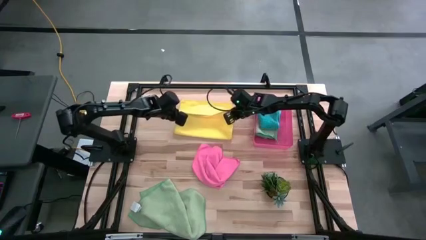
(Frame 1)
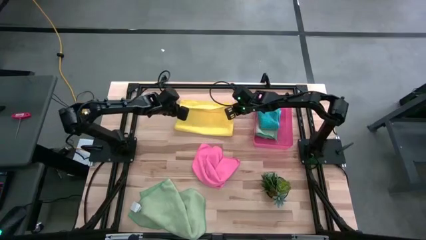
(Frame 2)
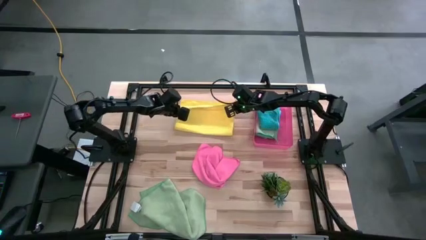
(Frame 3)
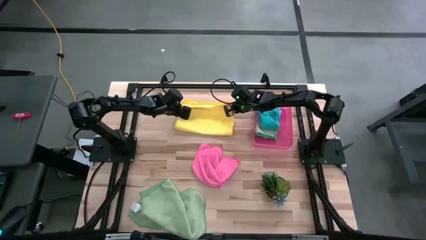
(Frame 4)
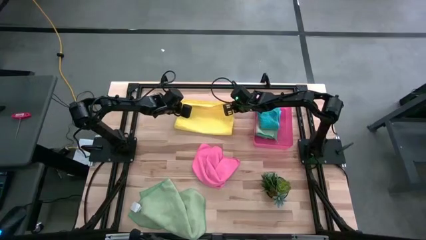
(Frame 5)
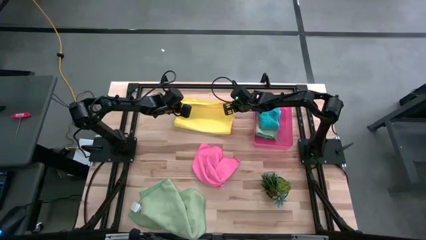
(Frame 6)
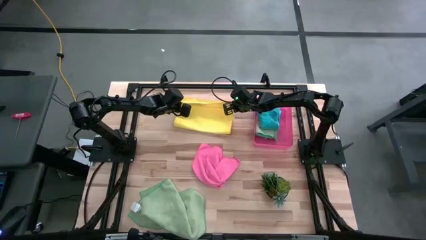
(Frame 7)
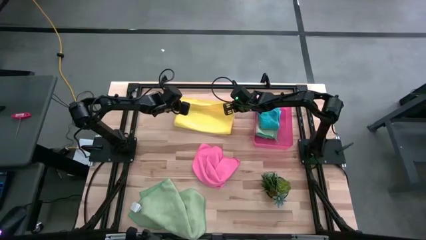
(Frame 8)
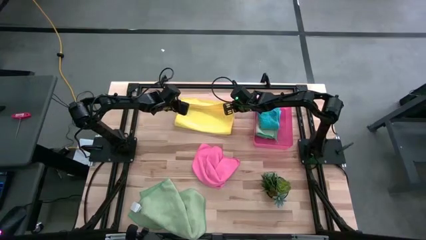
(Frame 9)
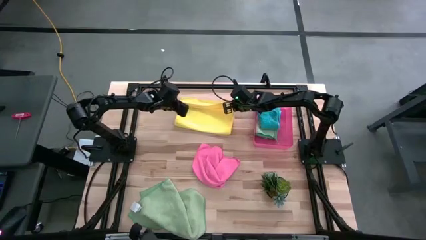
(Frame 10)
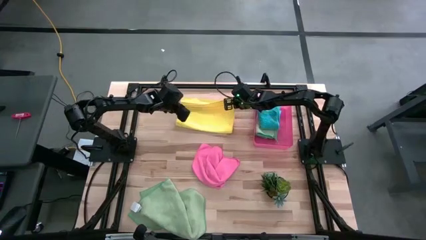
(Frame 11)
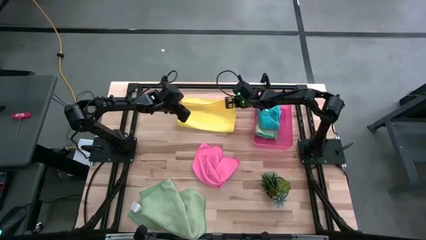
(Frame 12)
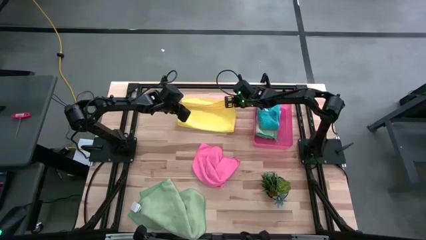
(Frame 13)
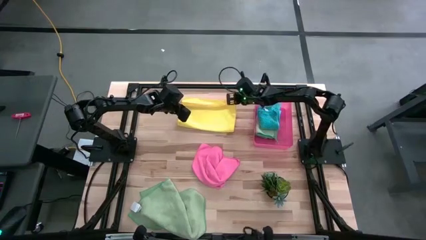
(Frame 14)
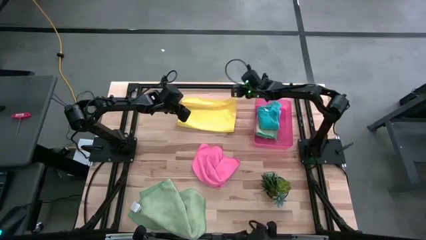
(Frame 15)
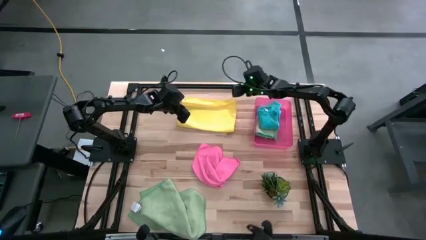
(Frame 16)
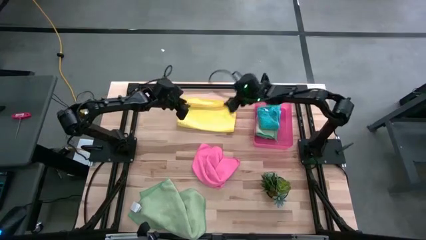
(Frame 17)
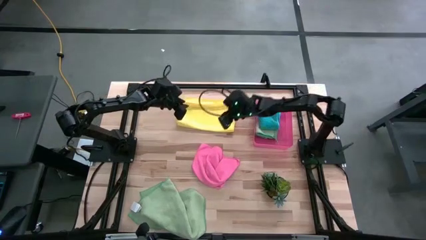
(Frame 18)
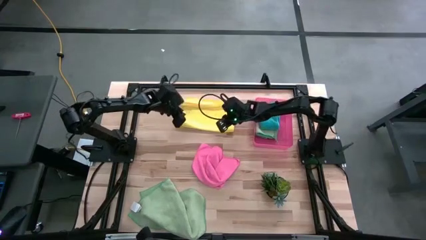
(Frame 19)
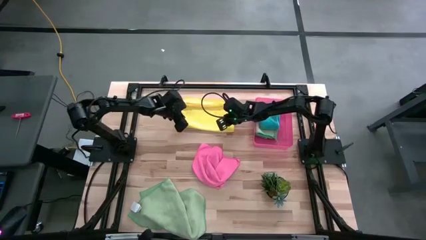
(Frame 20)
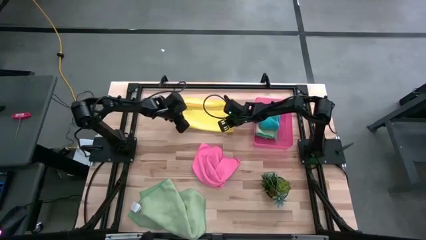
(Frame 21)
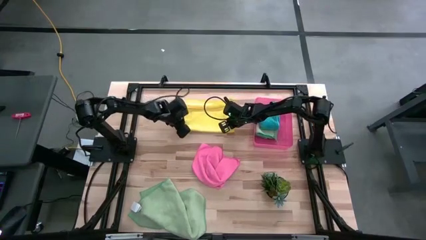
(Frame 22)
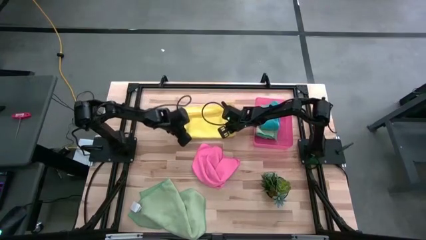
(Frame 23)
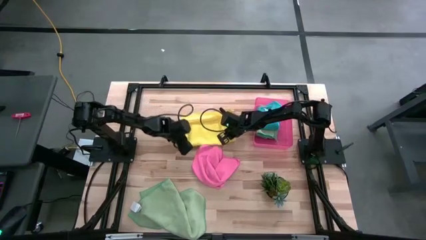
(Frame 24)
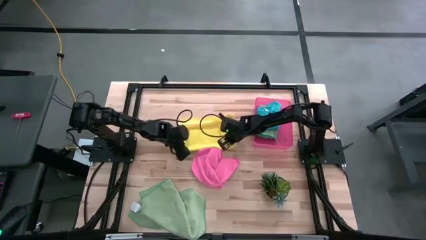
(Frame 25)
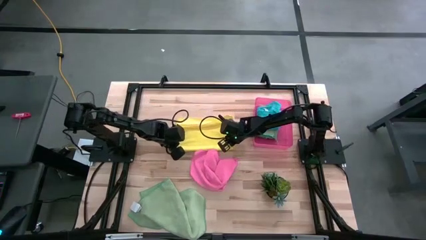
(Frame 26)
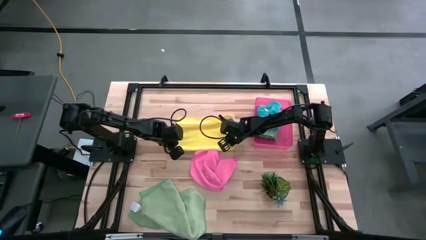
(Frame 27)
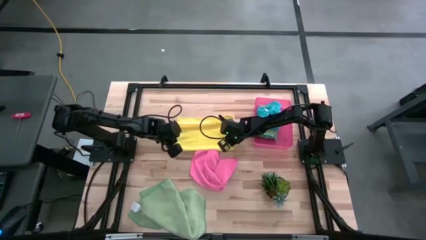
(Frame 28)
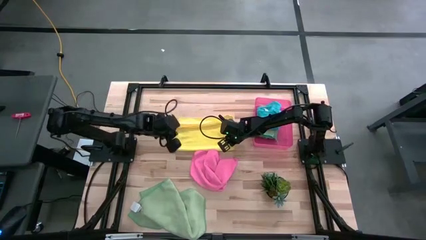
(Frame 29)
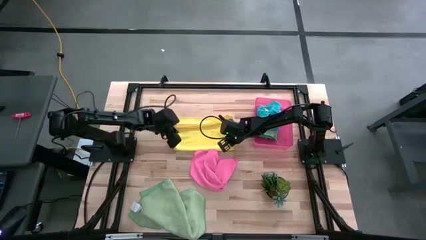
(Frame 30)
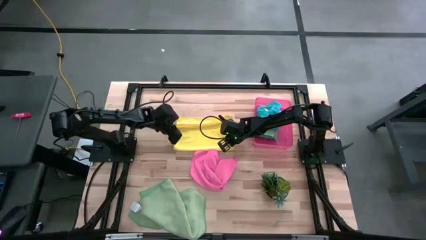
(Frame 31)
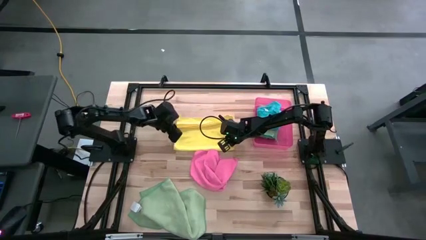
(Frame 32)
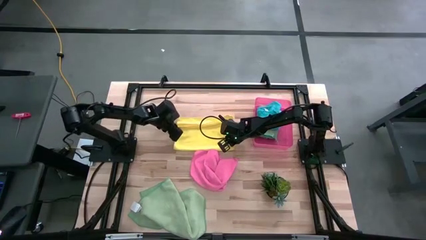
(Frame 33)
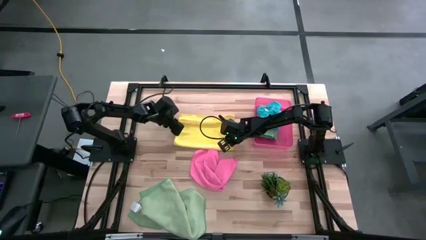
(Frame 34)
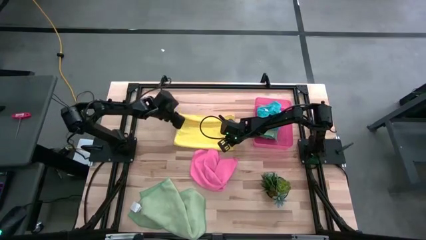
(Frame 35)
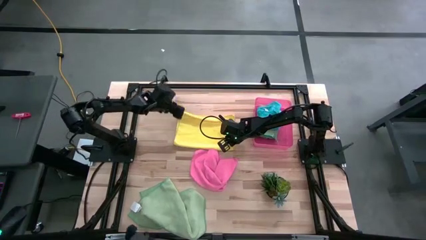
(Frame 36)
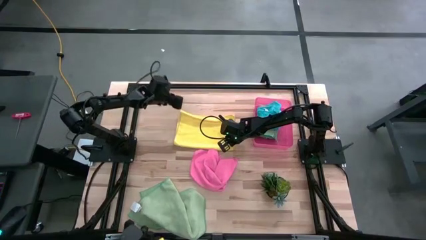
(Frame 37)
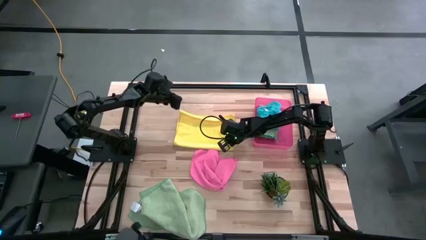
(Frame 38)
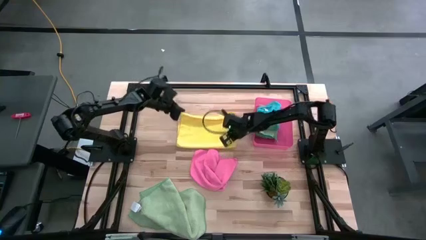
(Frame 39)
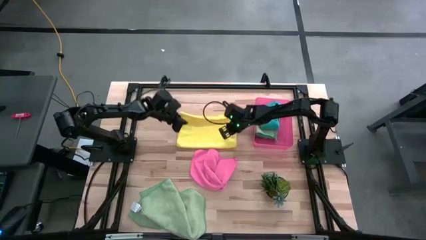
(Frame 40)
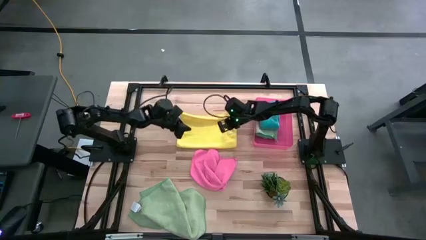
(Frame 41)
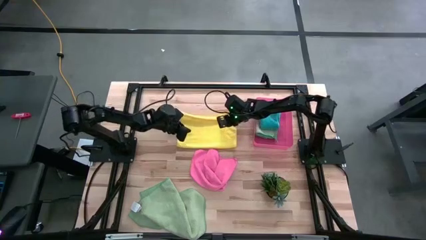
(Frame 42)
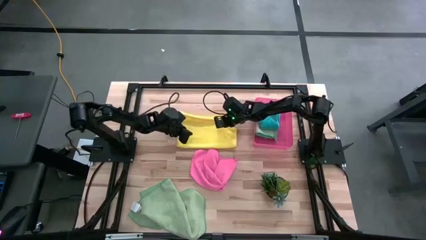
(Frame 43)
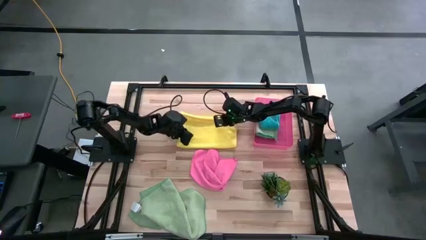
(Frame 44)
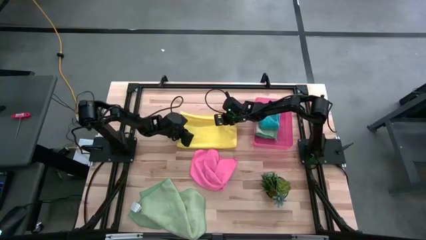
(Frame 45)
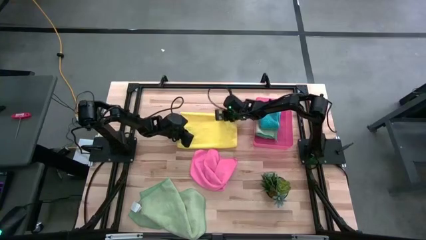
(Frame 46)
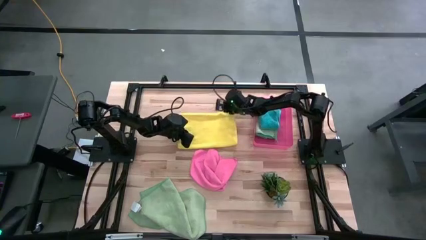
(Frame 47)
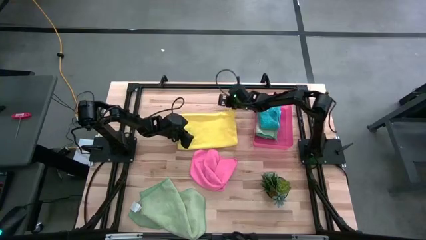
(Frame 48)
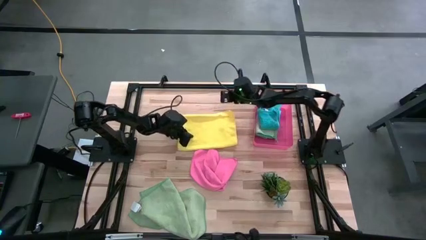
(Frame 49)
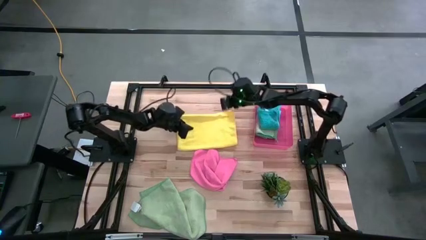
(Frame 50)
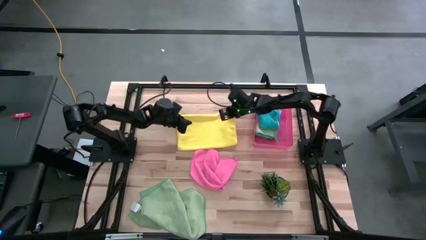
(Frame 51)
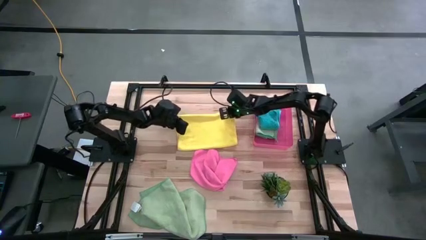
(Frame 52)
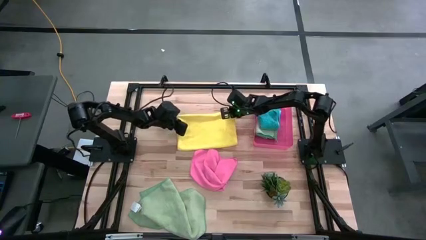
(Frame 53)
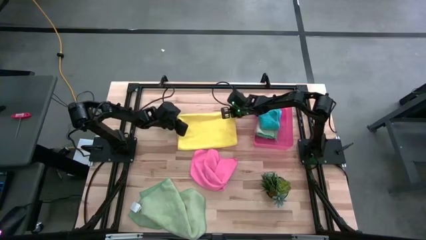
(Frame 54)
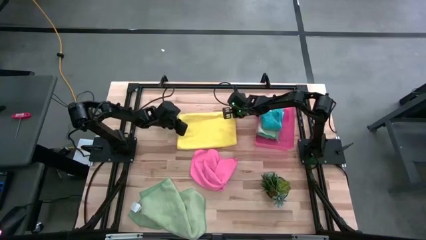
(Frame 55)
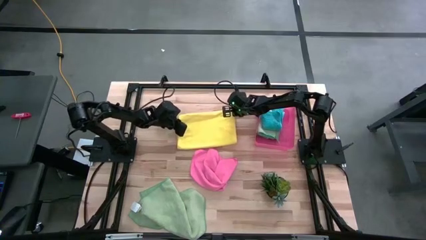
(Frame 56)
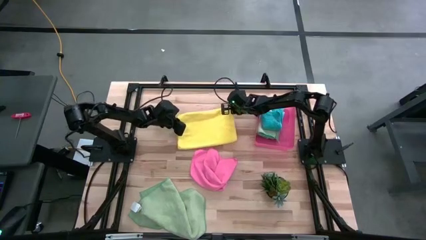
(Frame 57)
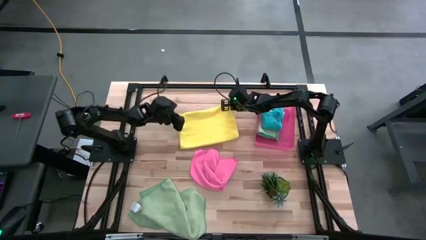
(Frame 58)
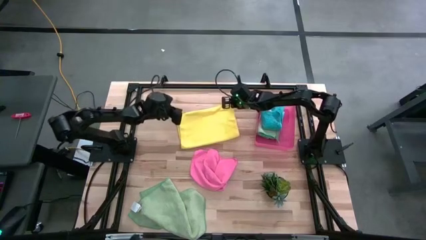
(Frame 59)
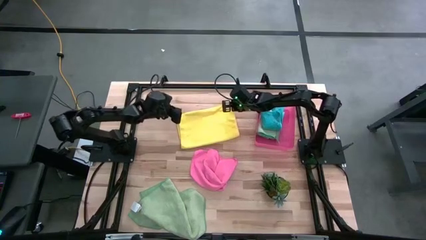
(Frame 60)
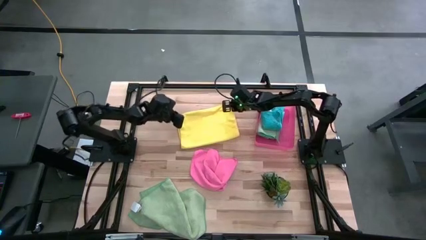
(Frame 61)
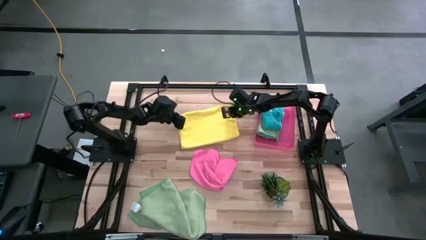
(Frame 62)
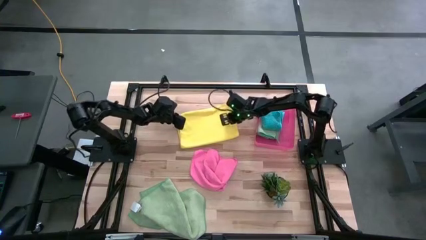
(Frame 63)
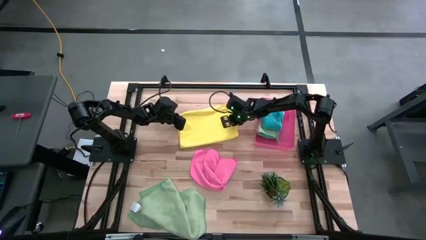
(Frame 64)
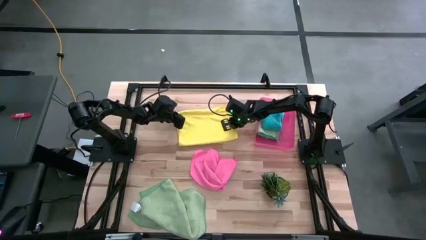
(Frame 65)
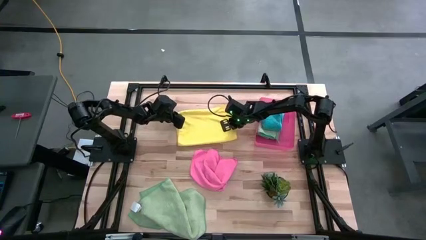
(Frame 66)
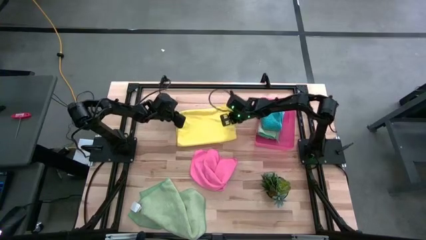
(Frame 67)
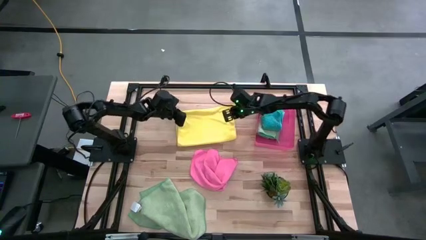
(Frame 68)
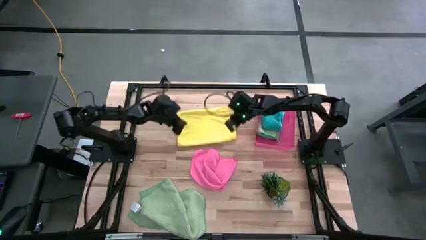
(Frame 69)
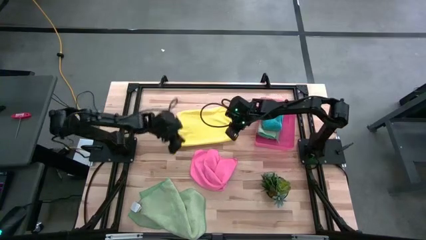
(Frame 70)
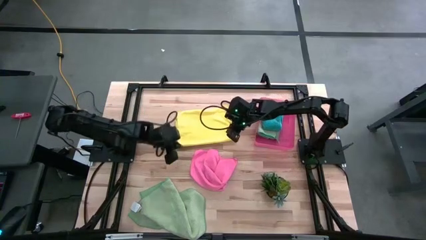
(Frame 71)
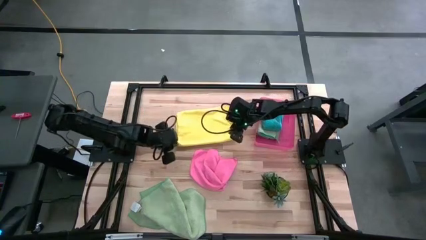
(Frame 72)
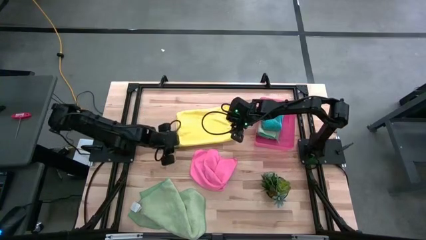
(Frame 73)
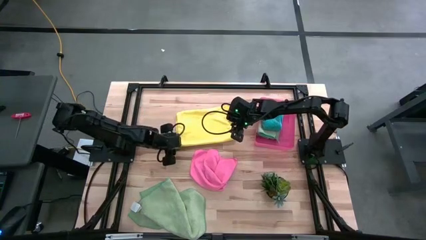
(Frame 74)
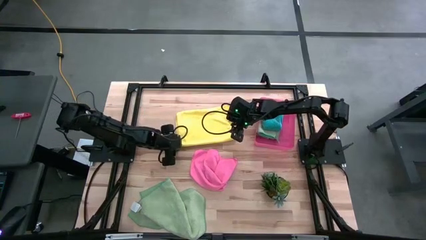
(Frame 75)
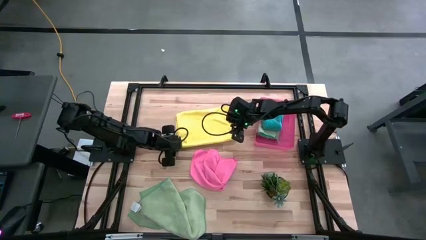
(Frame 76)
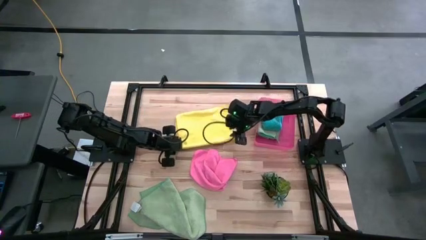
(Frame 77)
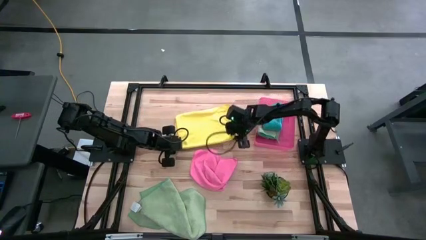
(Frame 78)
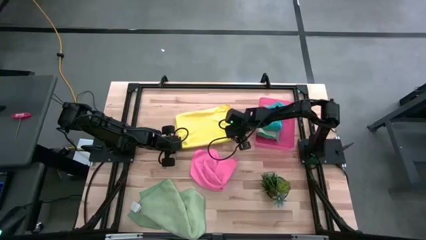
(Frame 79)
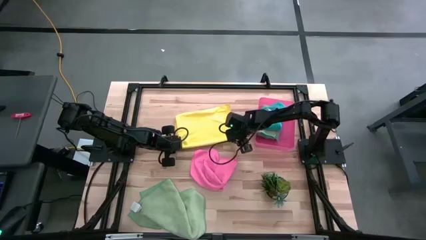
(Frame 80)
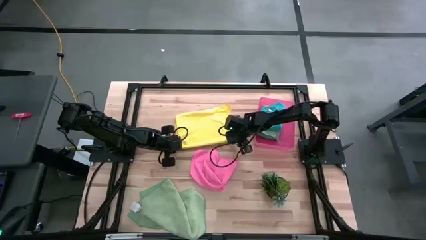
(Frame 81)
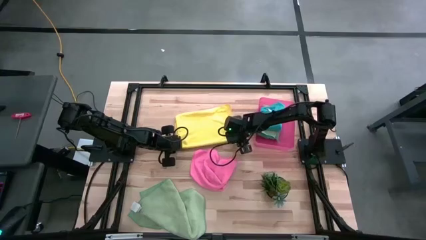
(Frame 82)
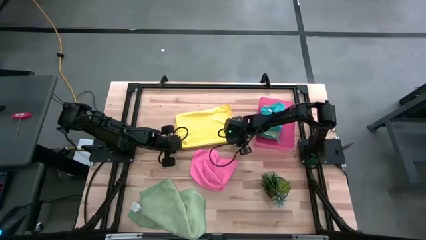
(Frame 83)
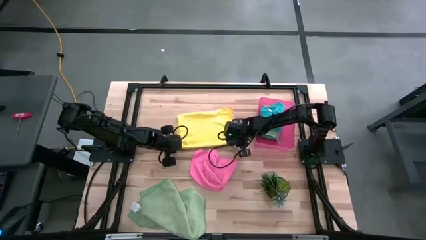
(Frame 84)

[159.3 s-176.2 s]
Task: Fold microfiber towels
Fold the yellow microfiber cloth
